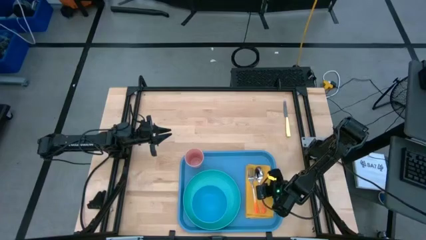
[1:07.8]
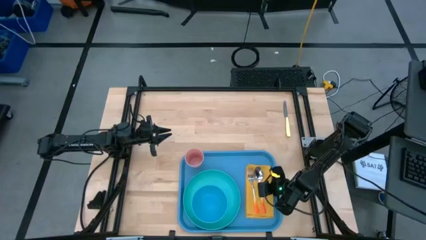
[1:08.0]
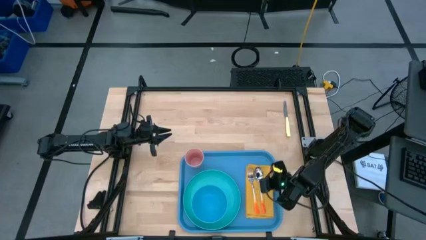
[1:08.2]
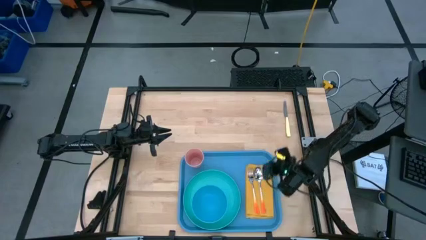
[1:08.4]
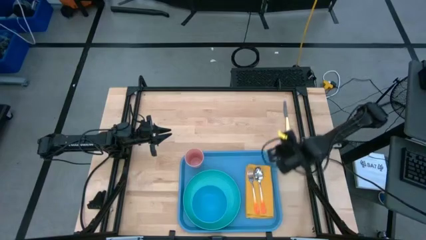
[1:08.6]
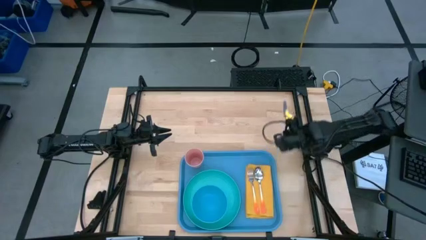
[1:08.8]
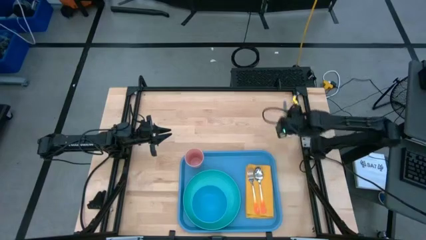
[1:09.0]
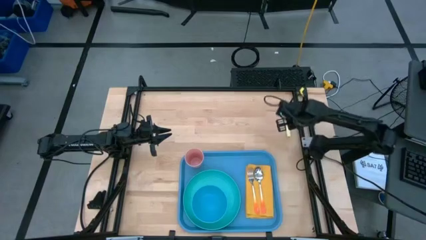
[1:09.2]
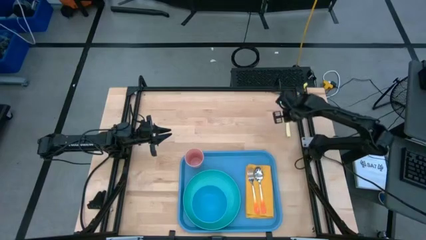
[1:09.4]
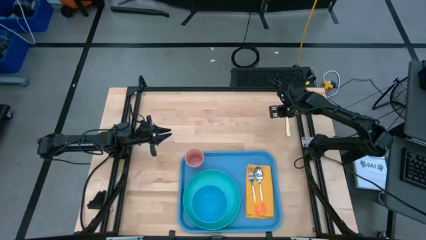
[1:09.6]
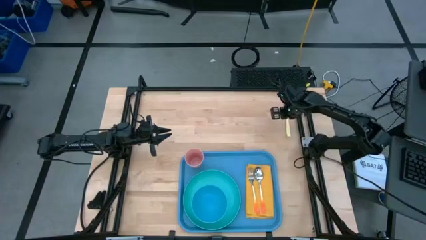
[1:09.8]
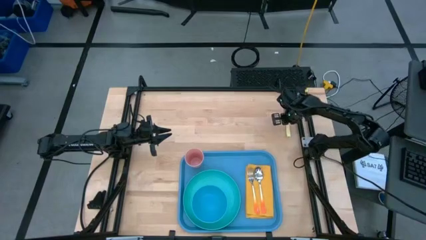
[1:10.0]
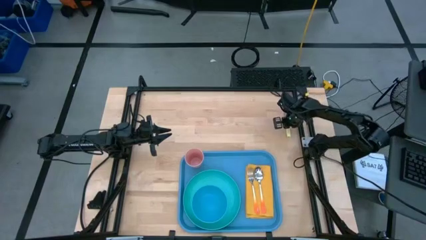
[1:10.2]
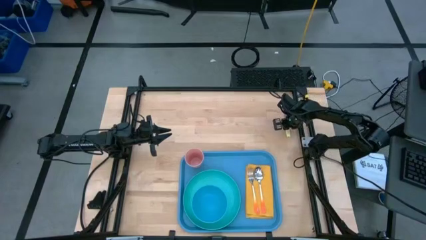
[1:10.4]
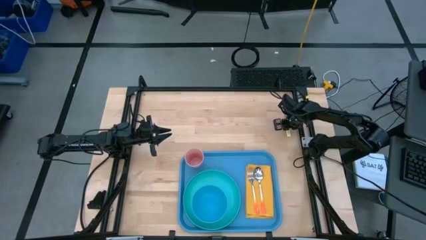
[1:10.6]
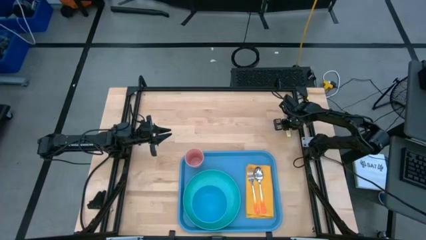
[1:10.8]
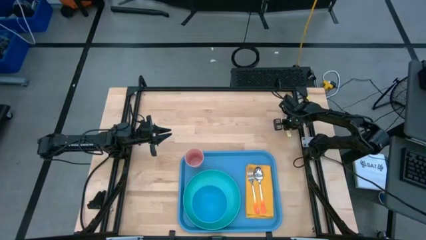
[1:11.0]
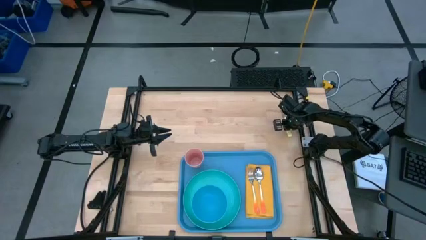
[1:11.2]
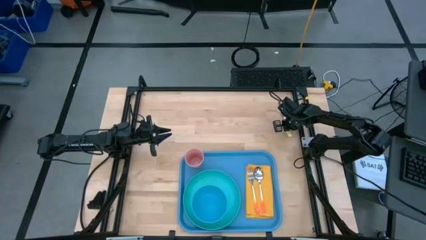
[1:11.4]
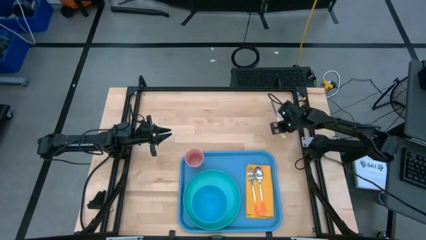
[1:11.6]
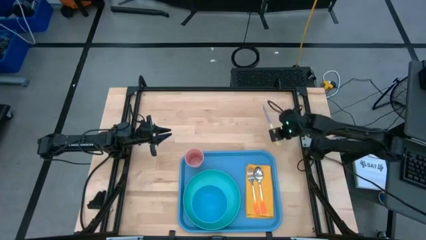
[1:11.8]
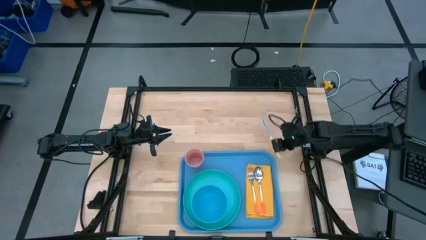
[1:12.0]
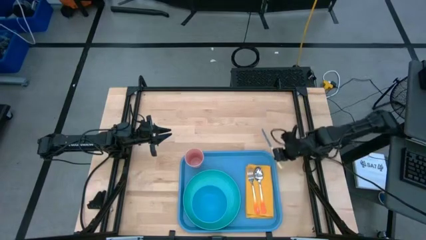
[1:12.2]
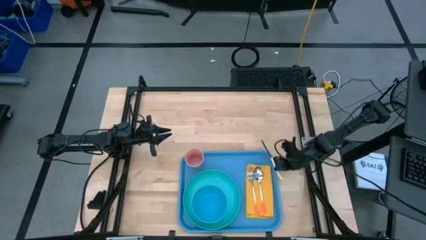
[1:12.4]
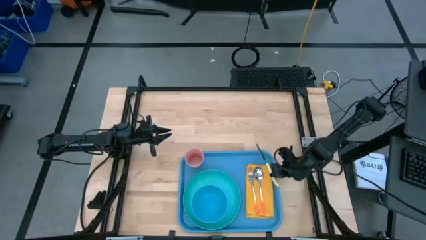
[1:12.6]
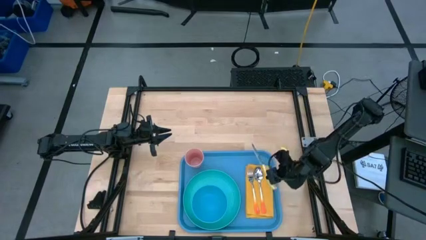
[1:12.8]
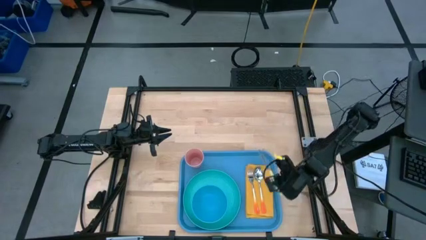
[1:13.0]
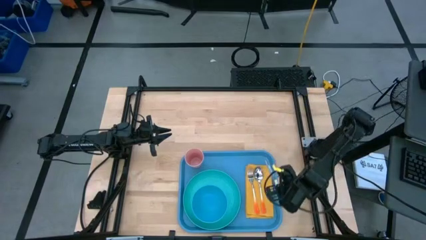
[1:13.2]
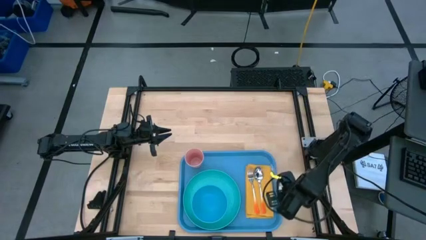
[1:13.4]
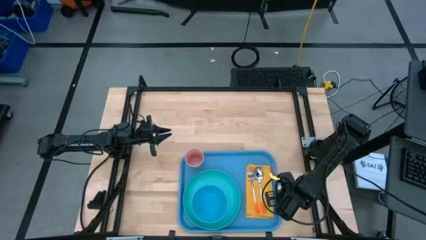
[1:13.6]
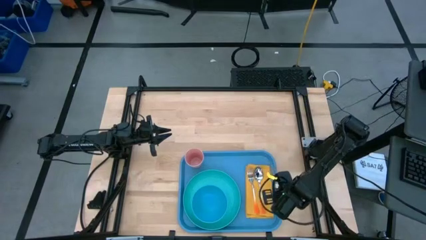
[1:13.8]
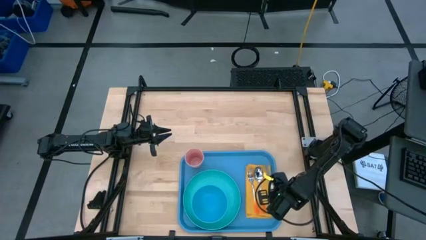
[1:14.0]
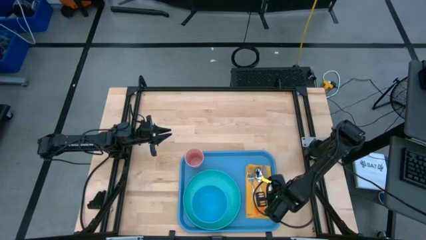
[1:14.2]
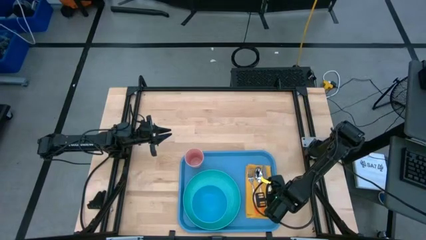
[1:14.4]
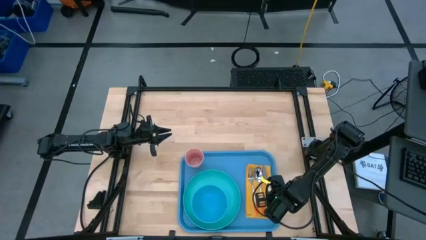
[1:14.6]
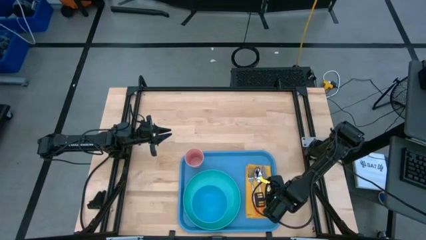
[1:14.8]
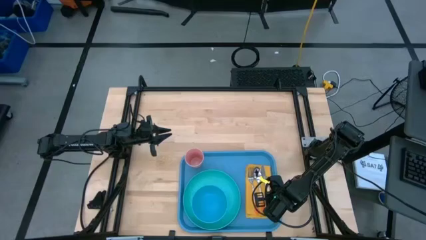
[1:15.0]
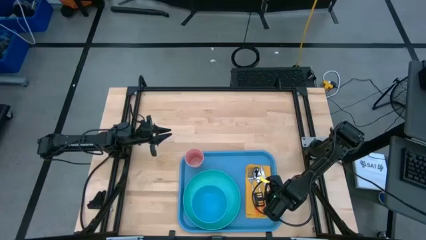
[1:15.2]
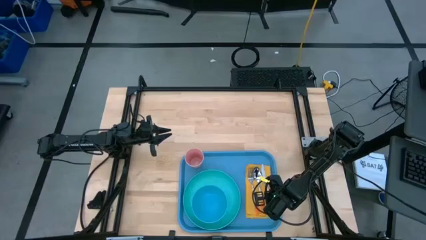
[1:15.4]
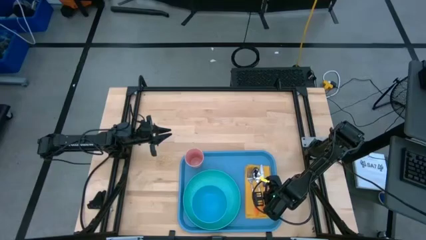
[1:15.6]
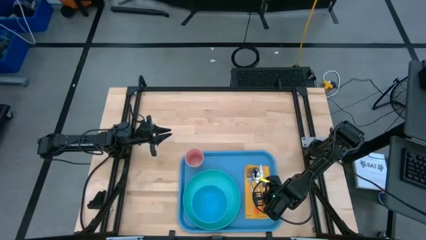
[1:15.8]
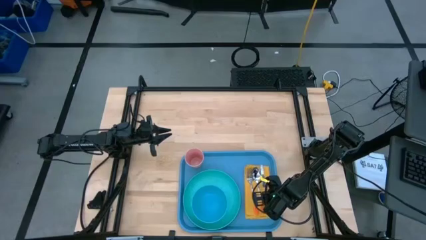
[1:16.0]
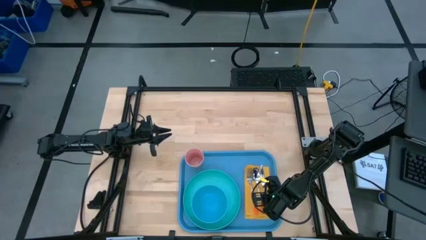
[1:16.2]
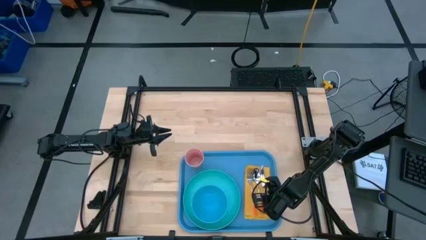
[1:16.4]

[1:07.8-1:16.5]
Task: Set up tray
Put the light yellow knife on the yellow napkin

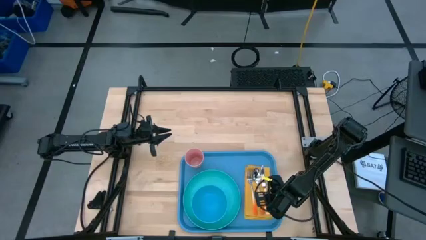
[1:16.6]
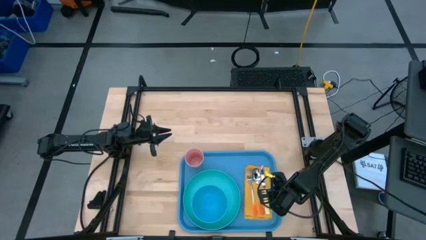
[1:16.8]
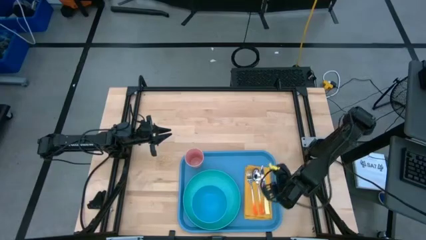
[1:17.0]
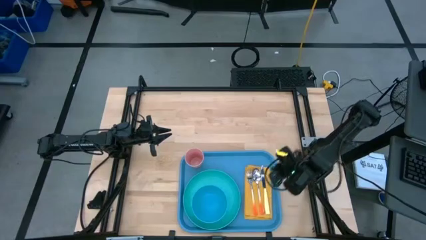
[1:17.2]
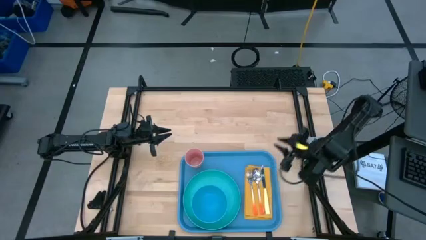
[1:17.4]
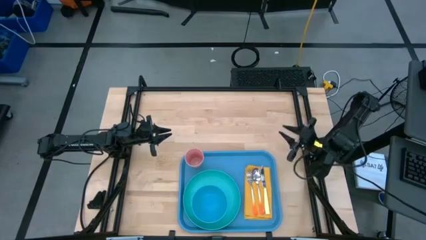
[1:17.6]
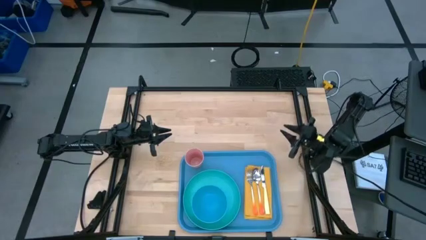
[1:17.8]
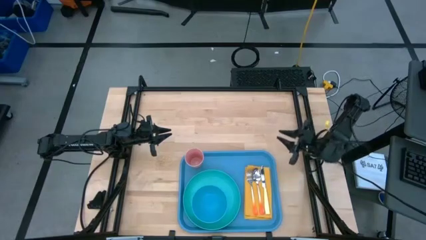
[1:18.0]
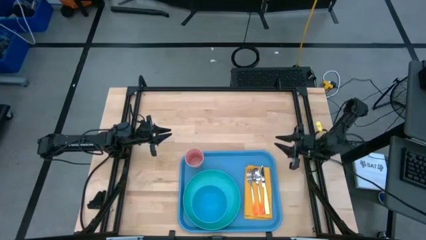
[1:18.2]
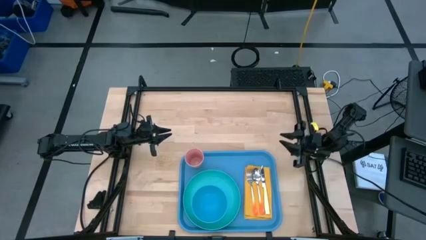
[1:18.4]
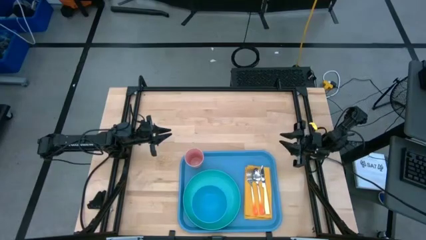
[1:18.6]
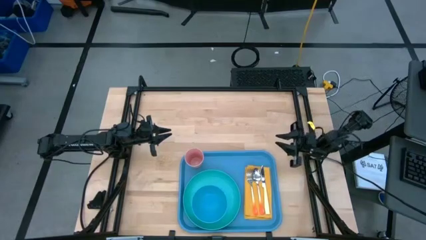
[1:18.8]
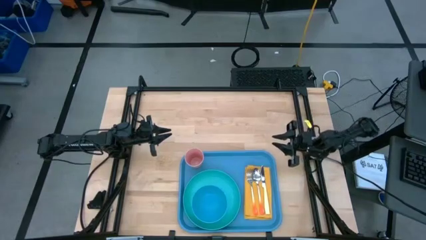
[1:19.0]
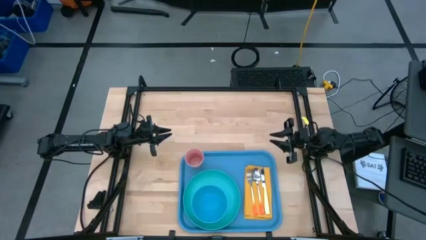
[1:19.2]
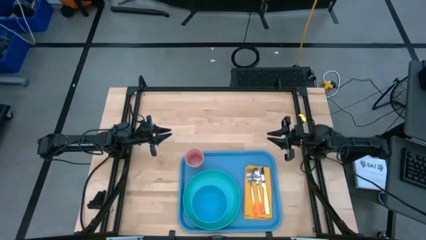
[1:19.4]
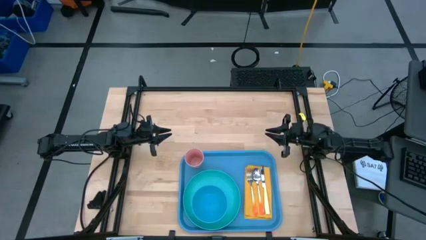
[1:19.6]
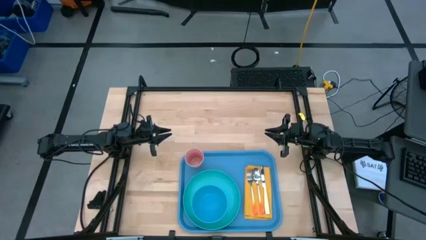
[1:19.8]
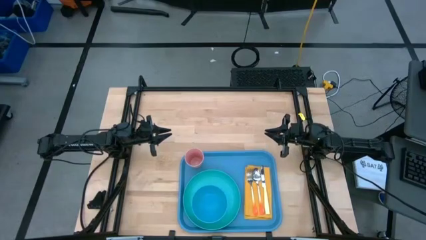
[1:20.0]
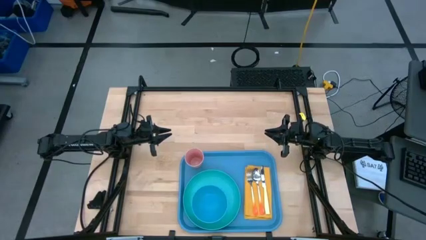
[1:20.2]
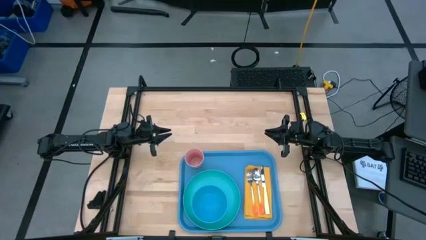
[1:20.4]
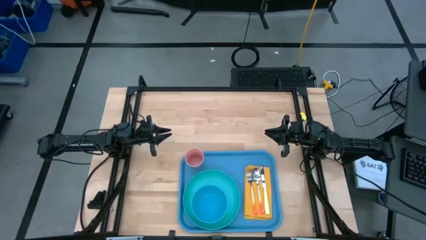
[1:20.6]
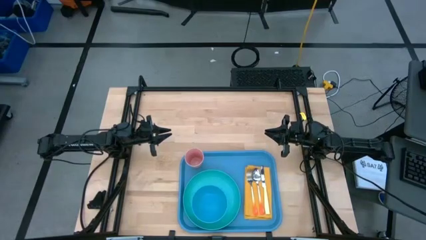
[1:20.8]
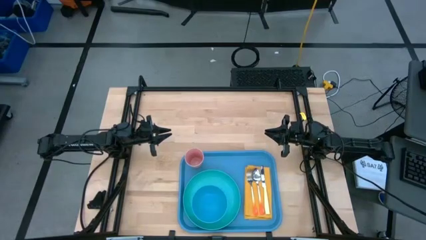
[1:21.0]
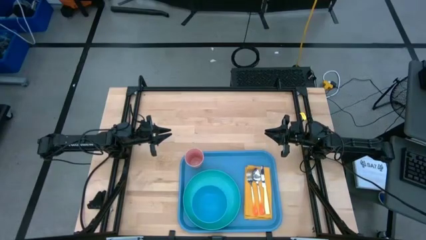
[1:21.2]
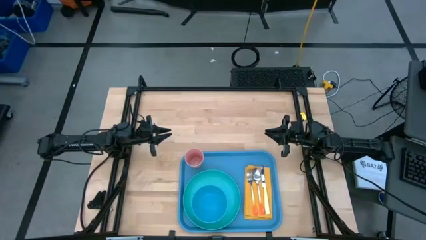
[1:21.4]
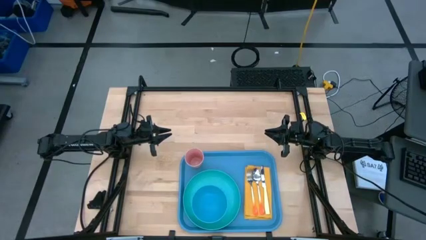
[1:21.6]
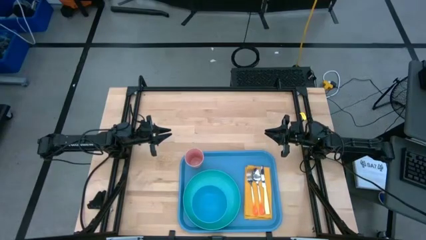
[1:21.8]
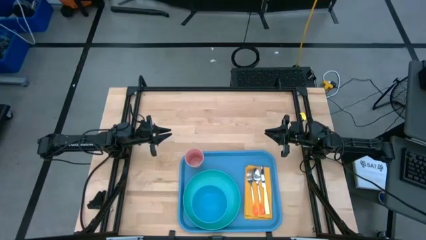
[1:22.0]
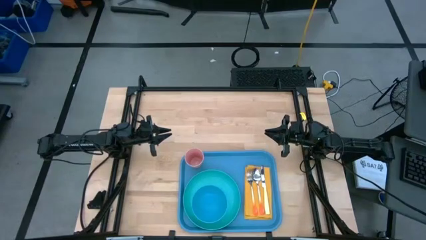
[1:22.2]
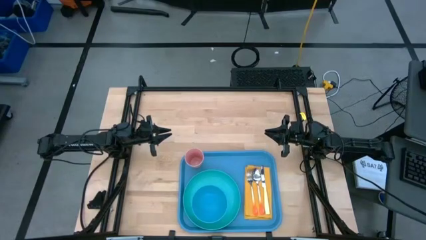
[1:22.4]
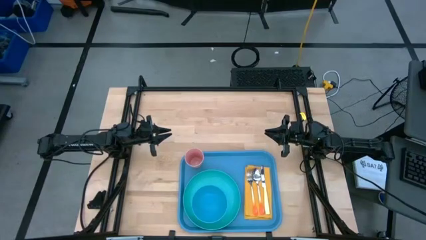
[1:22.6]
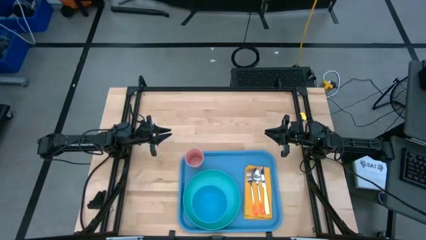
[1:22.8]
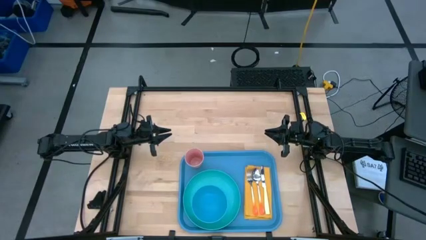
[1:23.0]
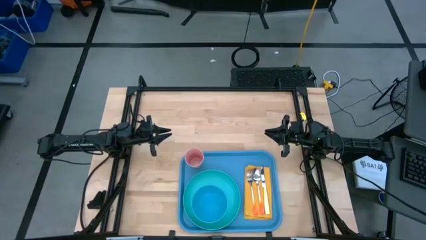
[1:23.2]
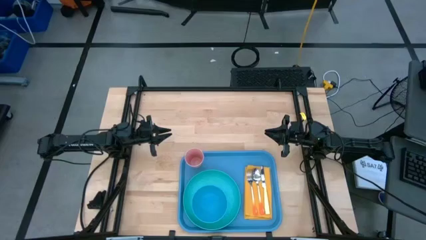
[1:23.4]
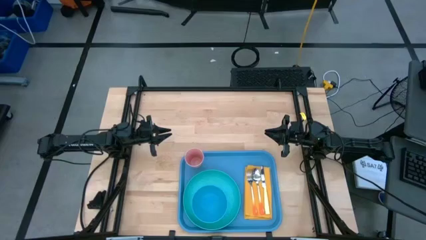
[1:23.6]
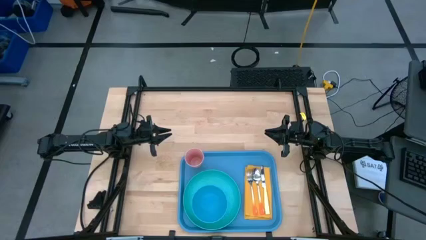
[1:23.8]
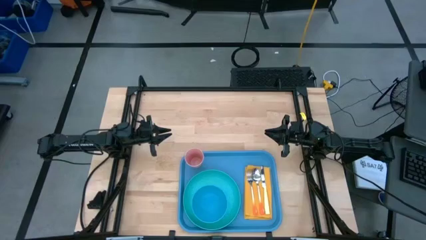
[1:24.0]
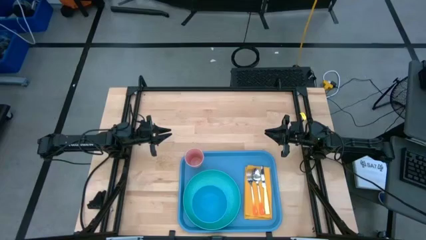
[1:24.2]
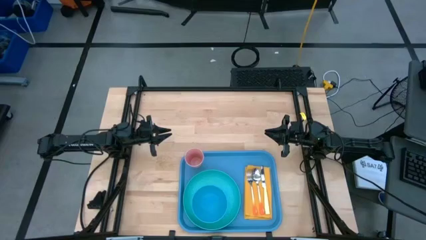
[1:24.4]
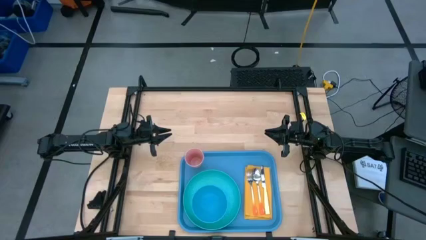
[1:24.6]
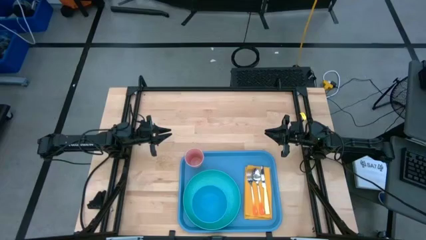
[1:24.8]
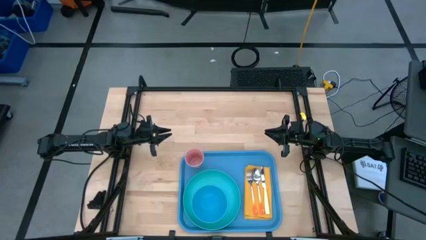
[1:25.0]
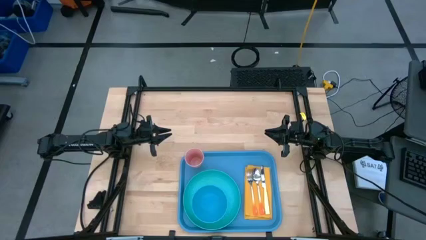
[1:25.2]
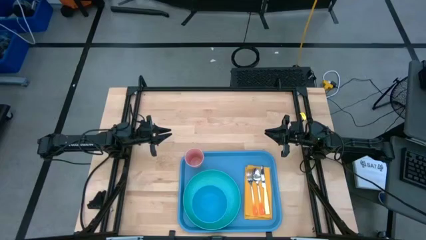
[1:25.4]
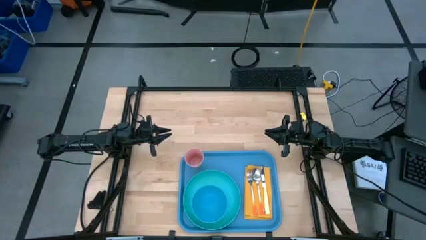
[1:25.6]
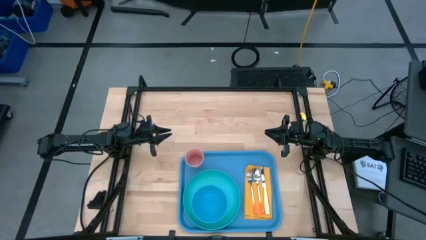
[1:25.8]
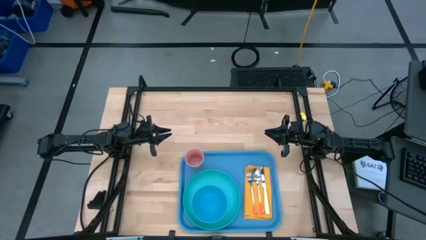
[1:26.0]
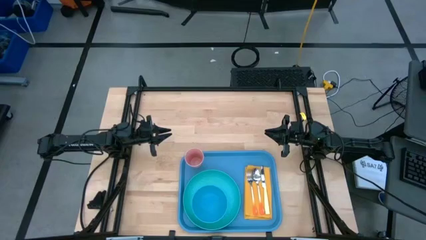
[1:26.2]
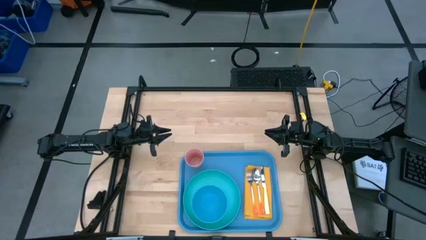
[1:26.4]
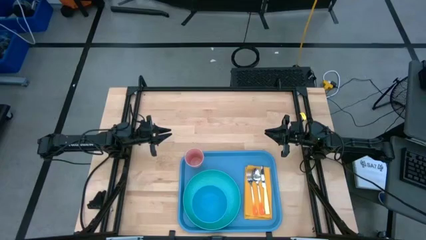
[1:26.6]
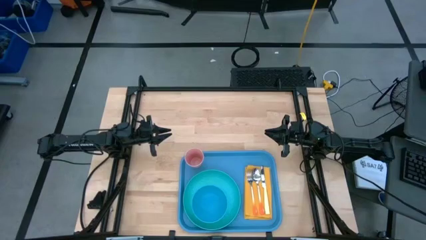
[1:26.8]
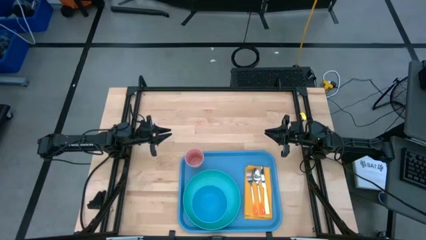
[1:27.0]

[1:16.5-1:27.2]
Return to Home Position
